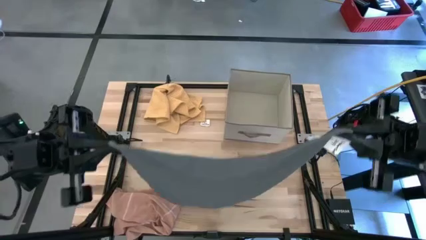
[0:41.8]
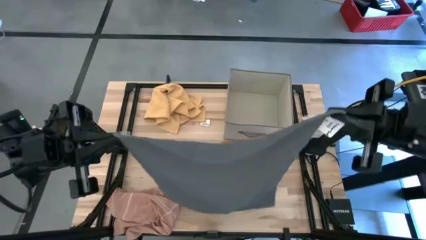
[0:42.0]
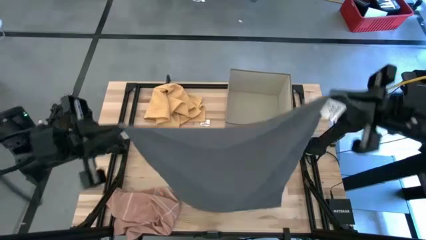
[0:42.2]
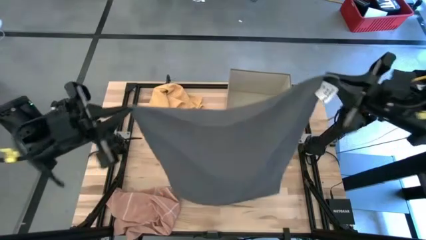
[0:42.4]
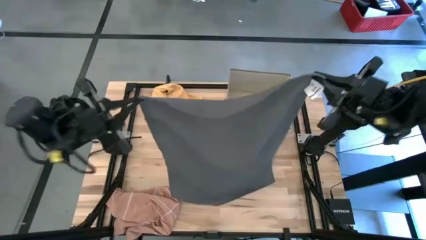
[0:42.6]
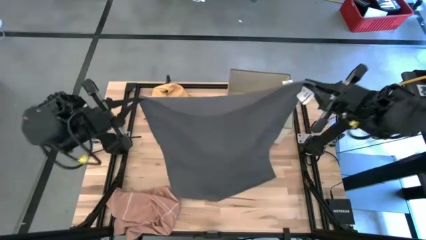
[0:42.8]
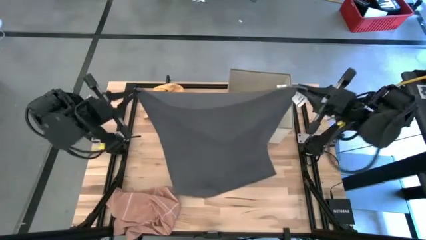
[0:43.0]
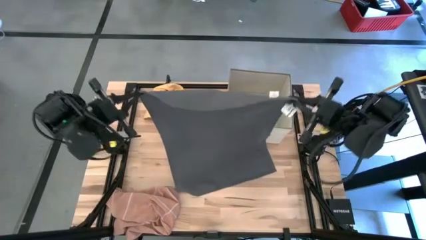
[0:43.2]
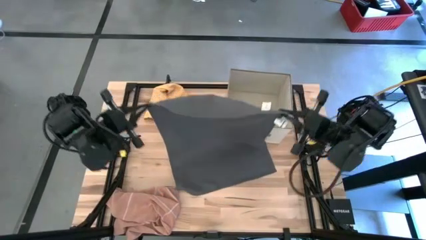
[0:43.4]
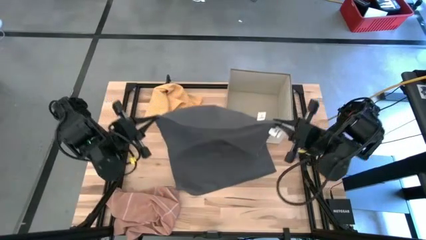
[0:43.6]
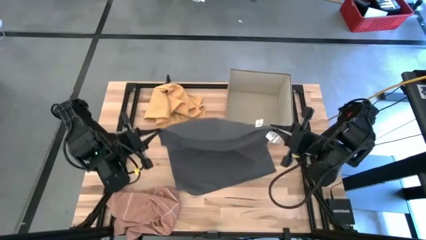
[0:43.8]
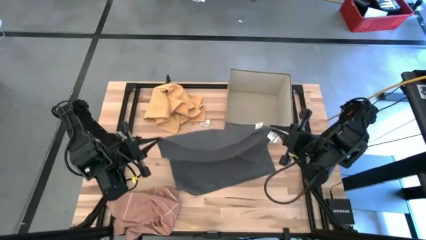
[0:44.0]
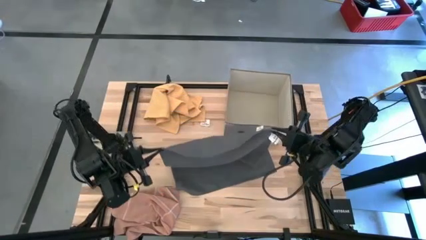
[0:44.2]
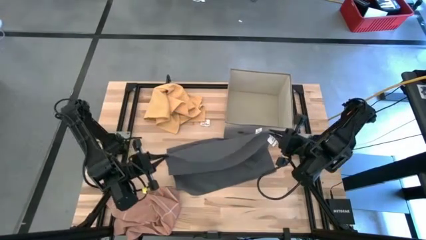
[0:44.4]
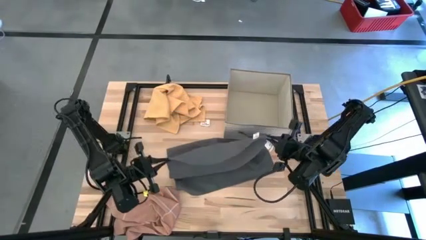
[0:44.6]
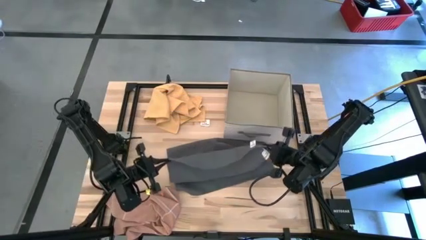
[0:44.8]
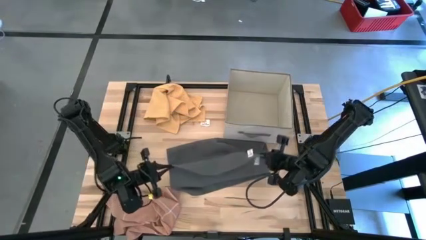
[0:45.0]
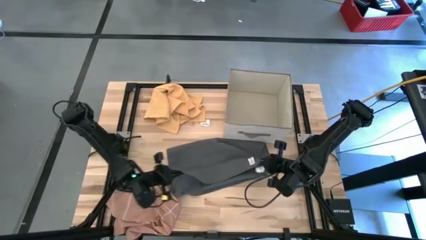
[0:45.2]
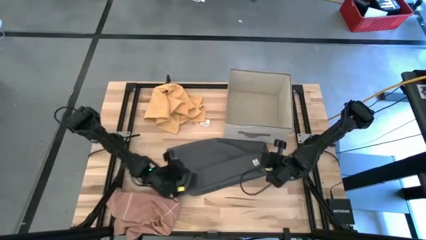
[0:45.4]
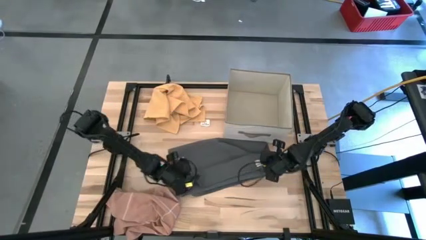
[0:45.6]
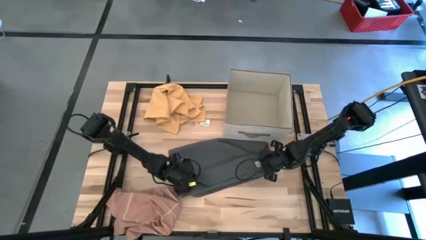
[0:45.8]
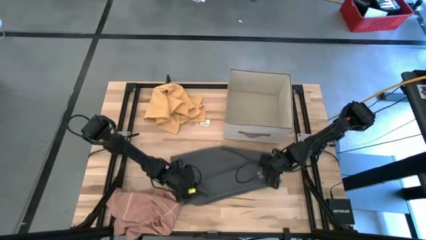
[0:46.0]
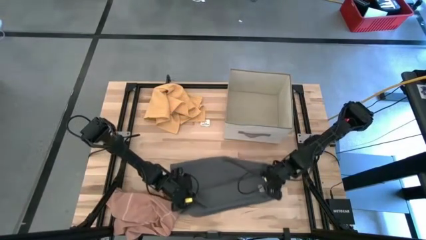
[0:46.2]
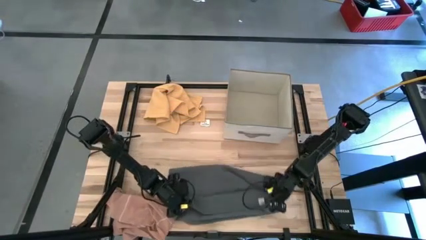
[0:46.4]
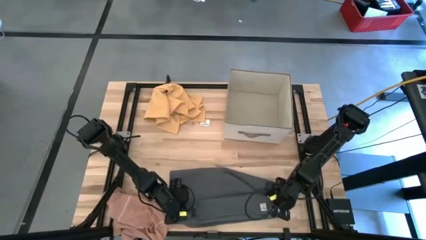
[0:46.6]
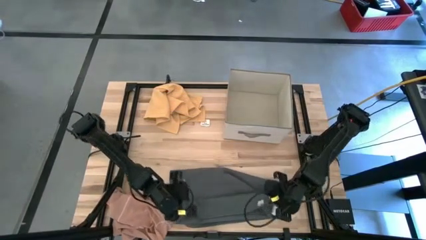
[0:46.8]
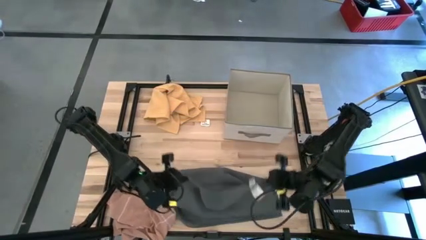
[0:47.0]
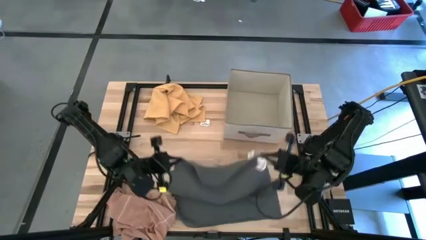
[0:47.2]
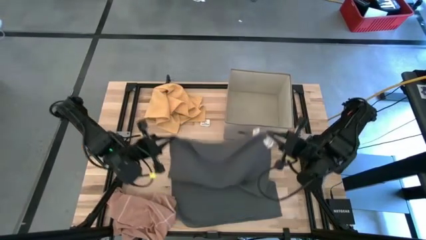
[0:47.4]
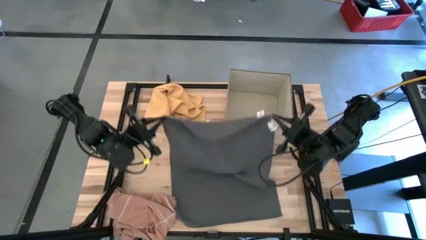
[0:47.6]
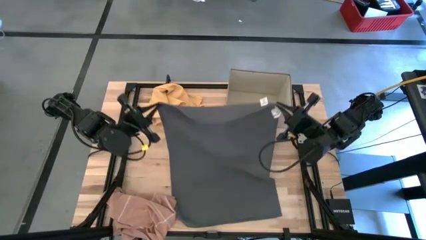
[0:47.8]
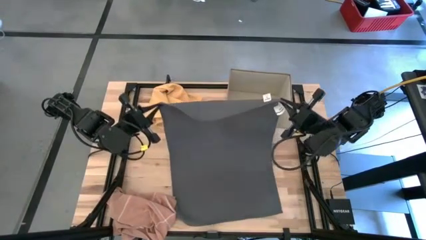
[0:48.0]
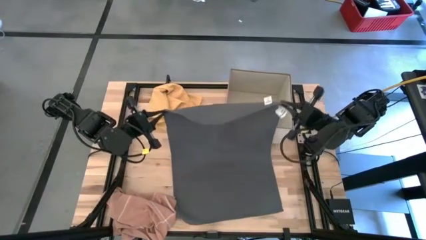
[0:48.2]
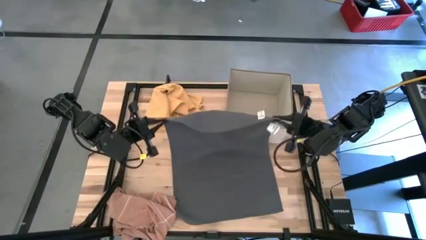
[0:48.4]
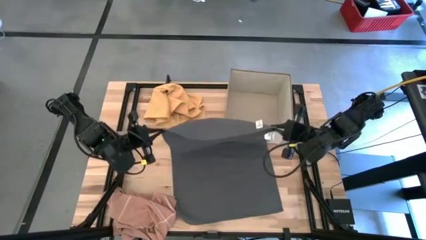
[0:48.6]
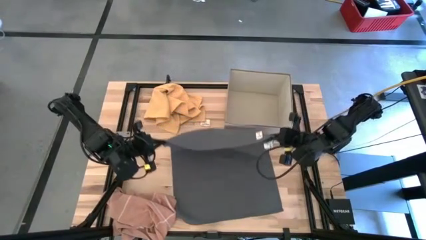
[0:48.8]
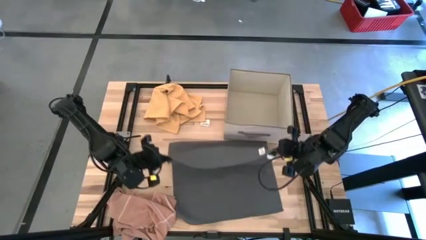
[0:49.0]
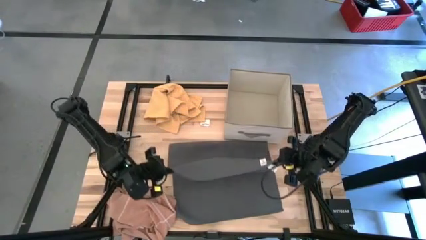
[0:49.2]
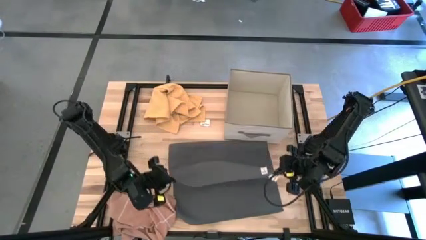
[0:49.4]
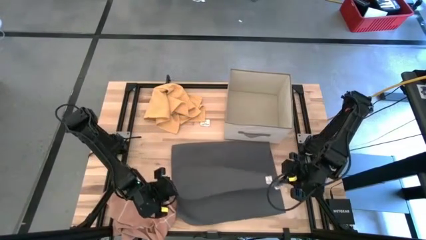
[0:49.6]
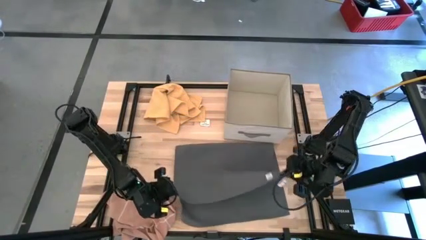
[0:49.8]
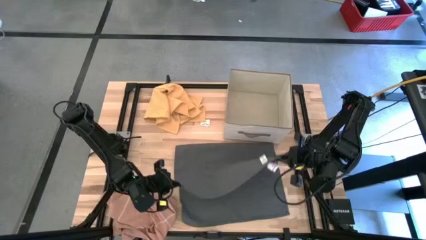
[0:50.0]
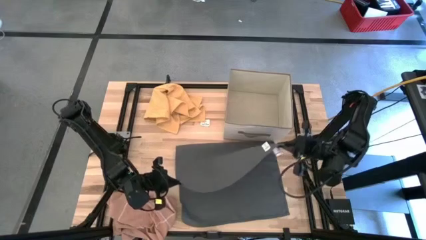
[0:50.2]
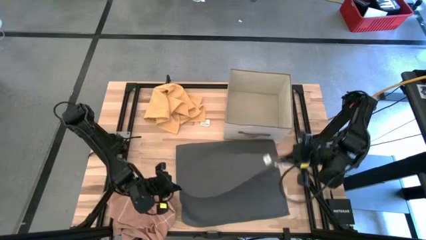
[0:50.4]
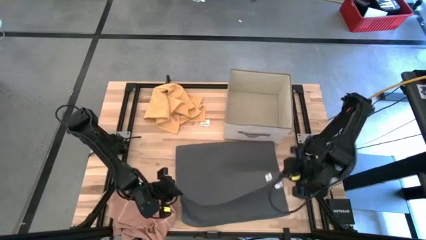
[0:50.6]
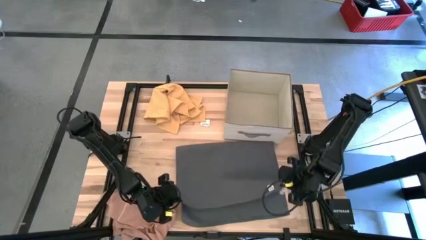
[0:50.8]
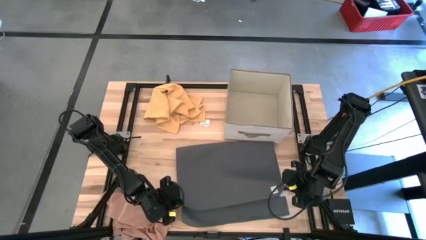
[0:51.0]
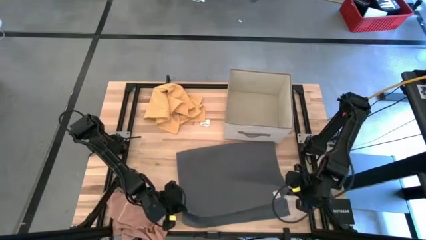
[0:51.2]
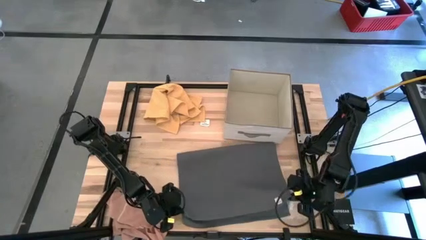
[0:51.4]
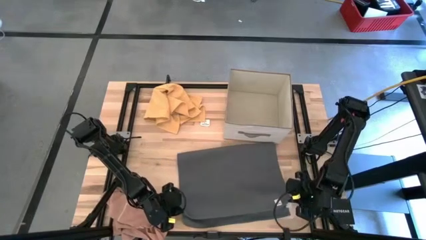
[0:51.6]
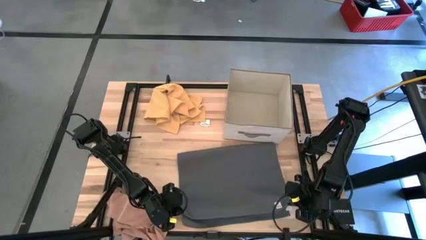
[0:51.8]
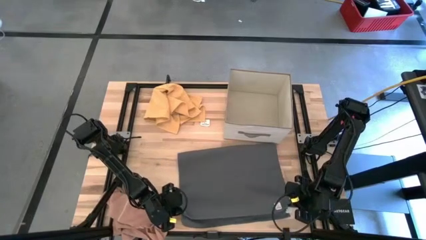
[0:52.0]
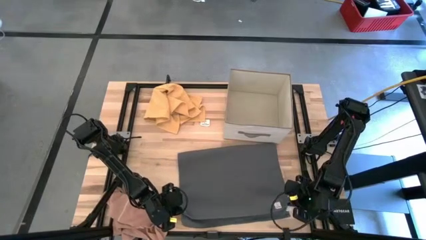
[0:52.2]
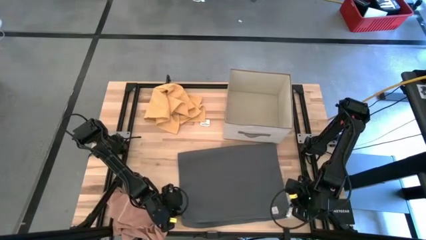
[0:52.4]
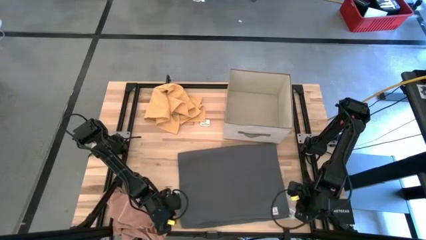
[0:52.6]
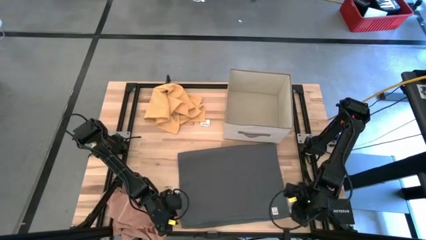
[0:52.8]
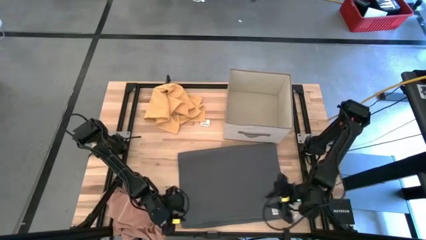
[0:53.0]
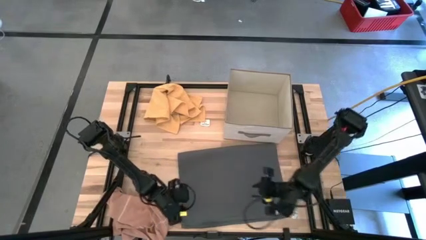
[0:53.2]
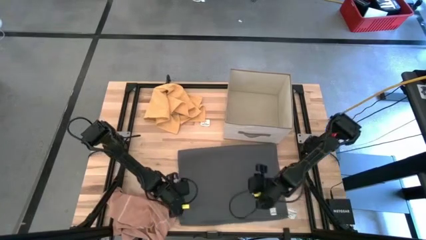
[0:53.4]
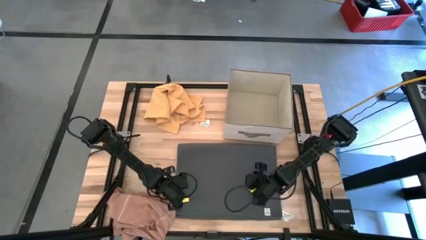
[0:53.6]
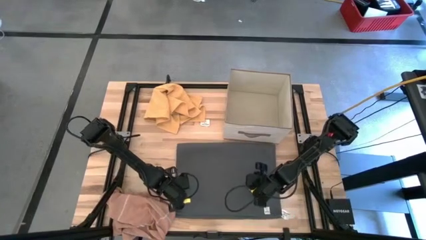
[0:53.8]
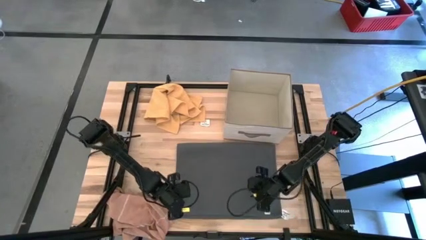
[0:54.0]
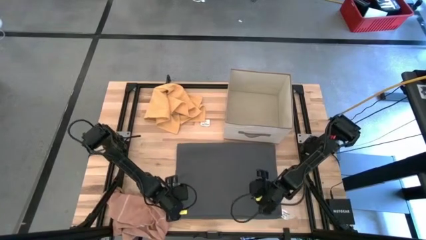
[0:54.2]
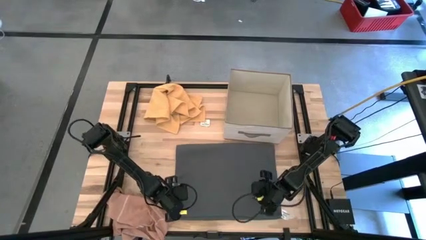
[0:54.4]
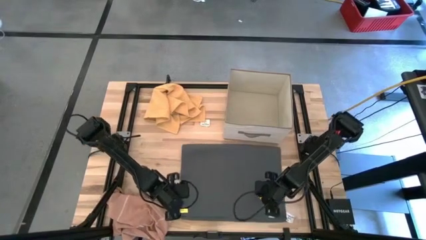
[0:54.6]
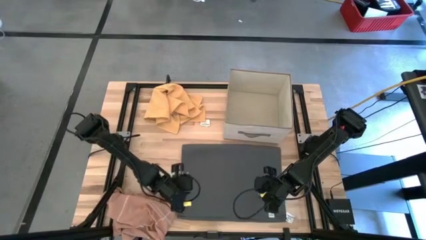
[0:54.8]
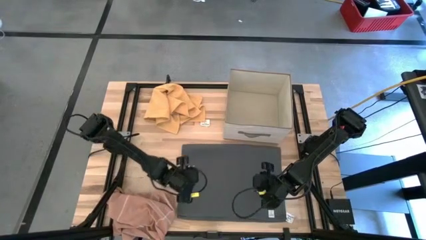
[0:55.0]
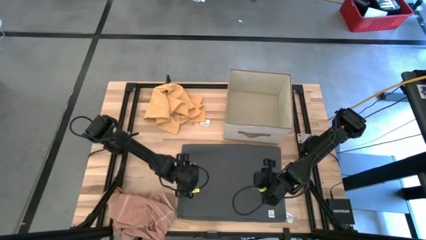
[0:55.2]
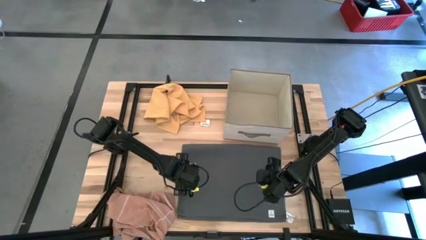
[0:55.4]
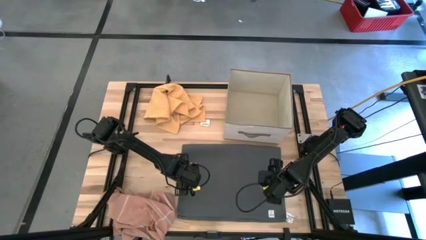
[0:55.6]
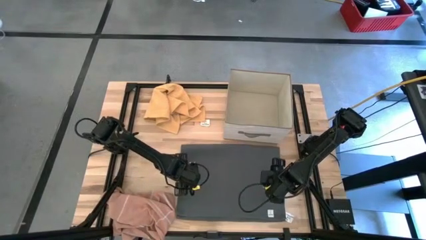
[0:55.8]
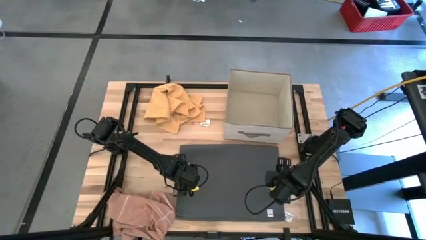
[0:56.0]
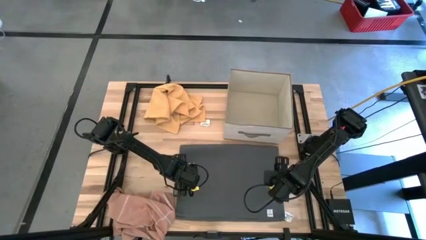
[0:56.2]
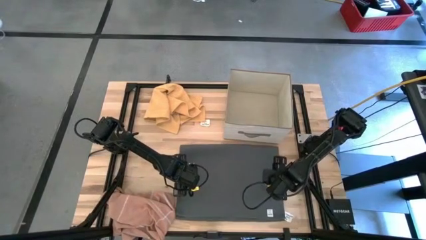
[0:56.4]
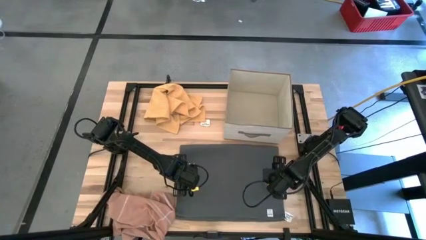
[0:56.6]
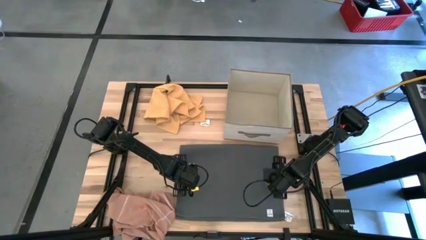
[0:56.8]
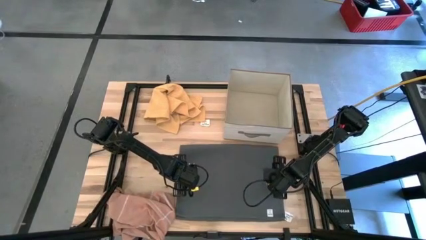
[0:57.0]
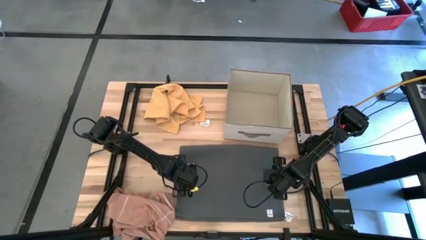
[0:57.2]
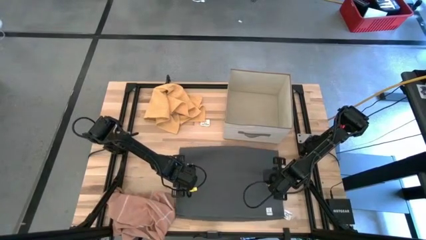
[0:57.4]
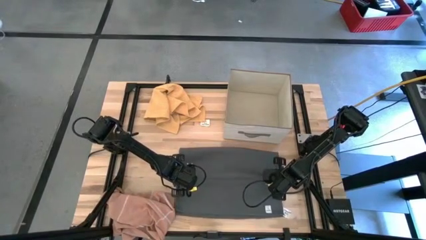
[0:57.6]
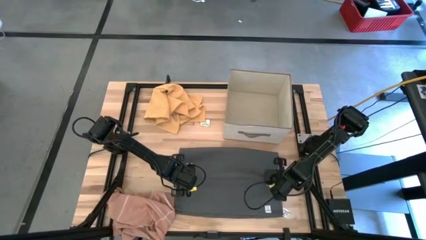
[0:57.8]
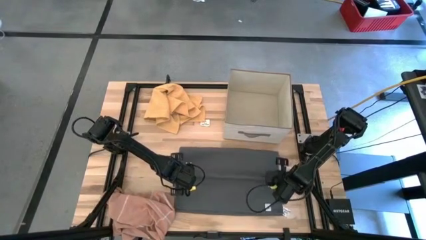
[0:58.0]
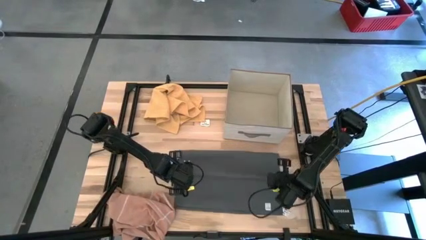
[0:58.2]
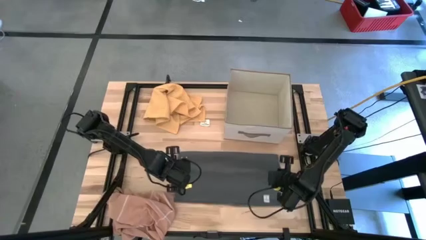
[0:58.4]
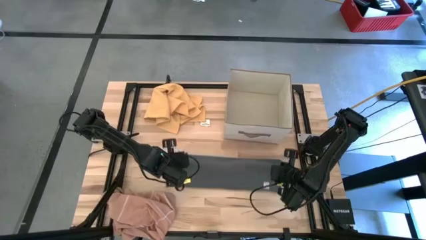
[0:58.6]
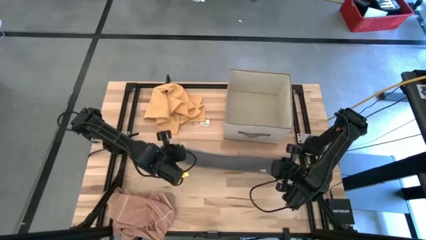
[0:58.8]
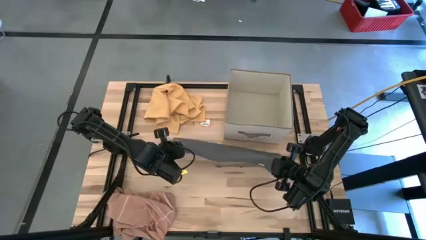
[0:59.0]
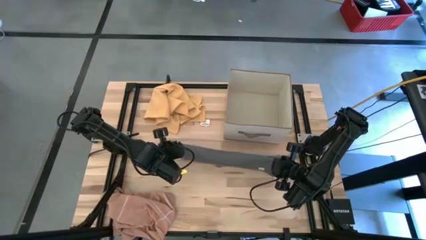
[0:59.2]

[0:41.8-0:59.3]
Task: Fold towel
Fold the gray towel
